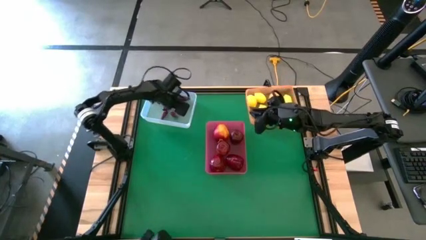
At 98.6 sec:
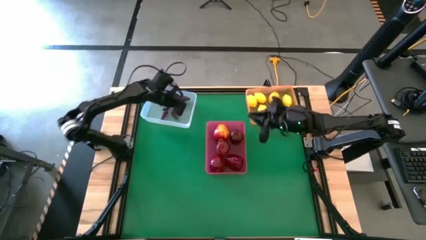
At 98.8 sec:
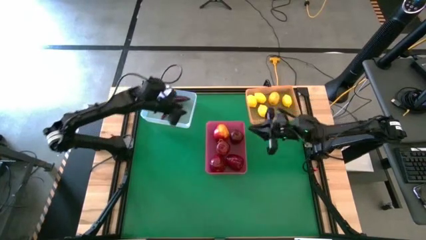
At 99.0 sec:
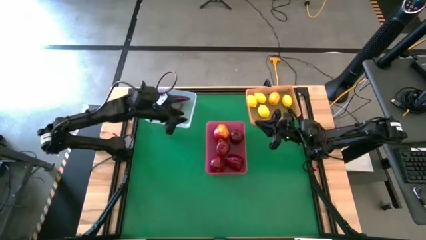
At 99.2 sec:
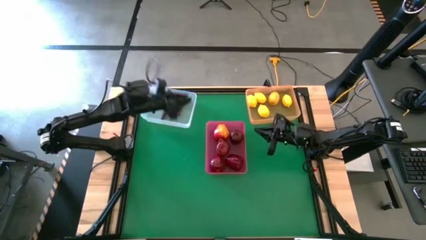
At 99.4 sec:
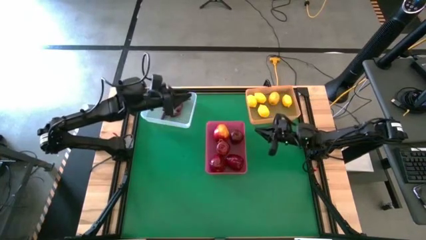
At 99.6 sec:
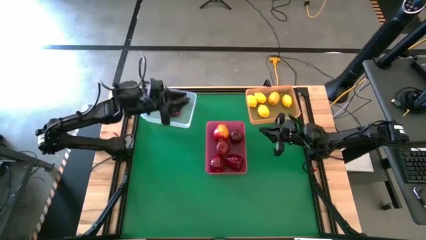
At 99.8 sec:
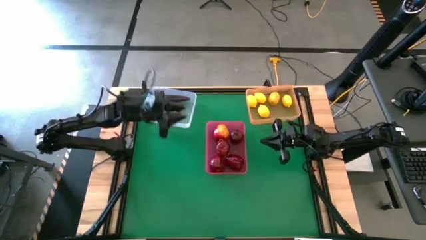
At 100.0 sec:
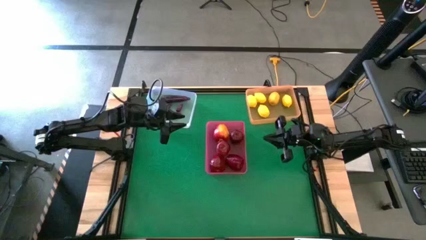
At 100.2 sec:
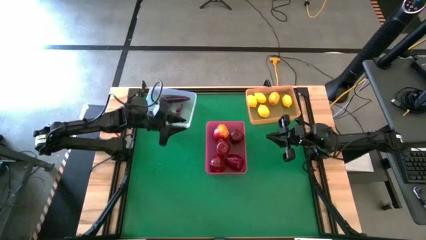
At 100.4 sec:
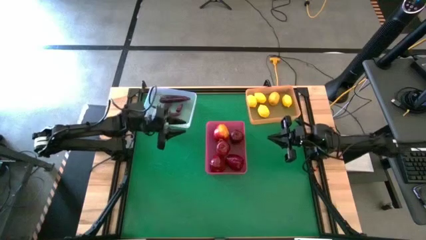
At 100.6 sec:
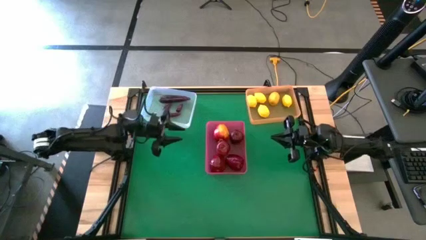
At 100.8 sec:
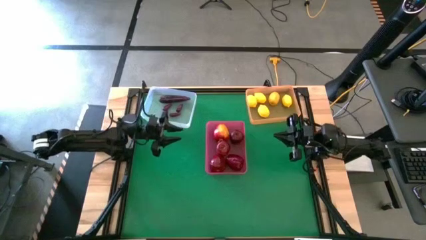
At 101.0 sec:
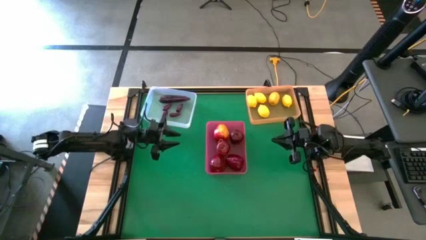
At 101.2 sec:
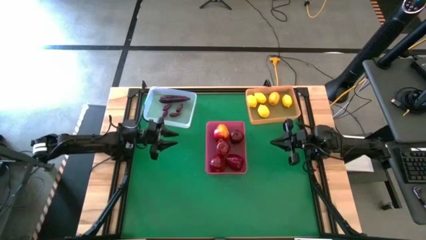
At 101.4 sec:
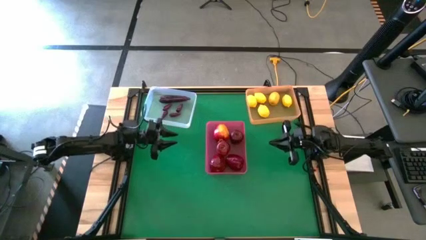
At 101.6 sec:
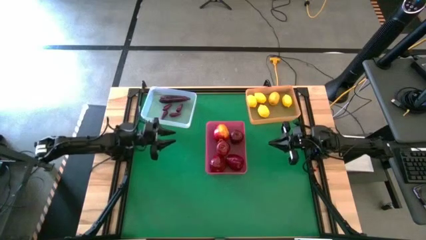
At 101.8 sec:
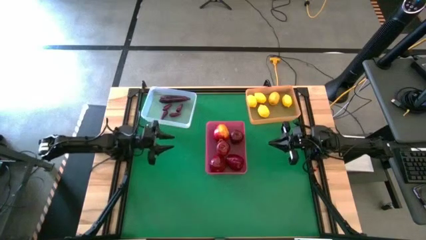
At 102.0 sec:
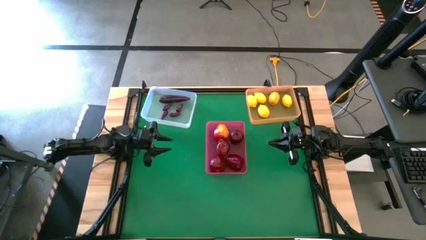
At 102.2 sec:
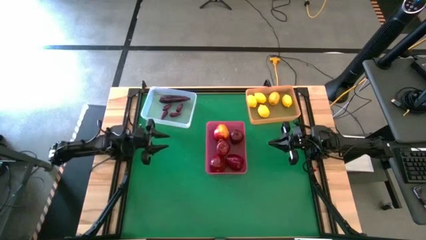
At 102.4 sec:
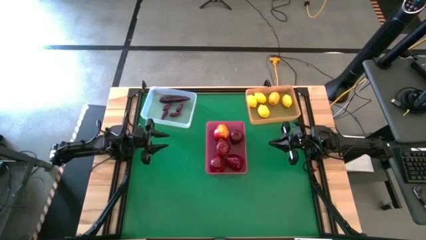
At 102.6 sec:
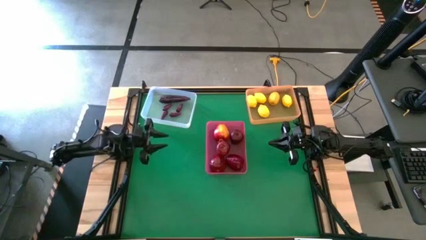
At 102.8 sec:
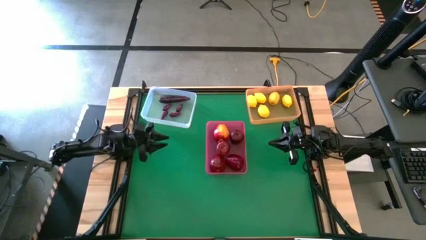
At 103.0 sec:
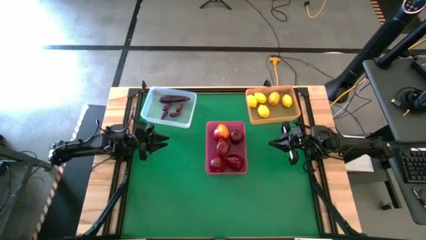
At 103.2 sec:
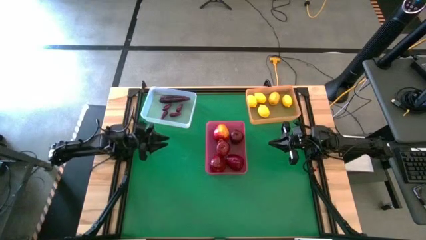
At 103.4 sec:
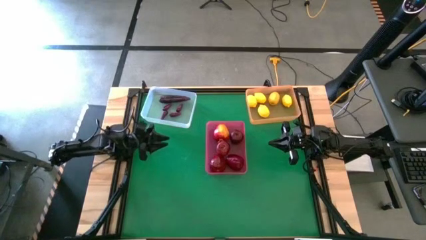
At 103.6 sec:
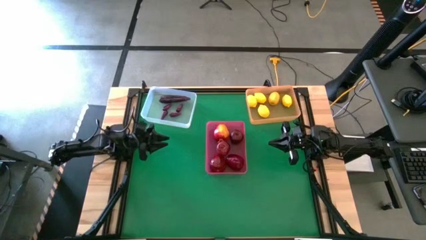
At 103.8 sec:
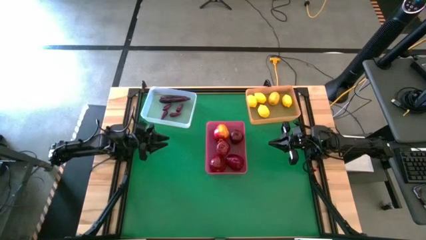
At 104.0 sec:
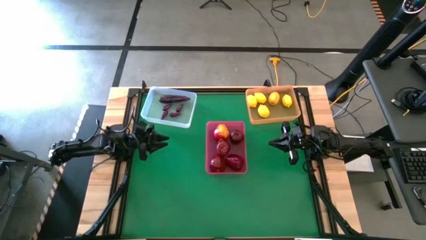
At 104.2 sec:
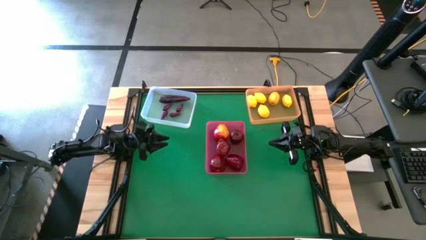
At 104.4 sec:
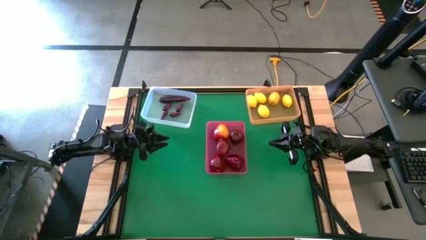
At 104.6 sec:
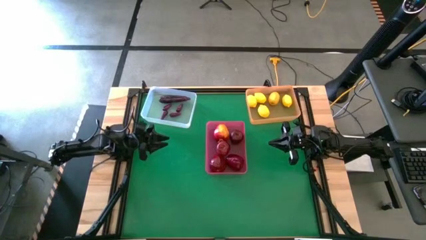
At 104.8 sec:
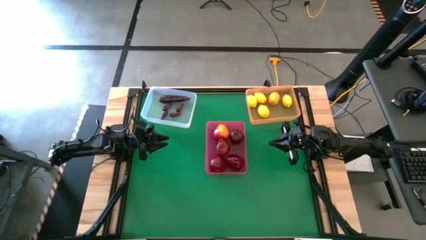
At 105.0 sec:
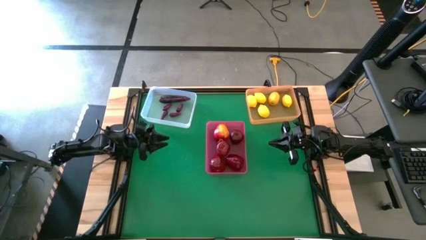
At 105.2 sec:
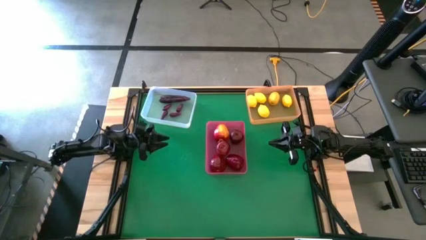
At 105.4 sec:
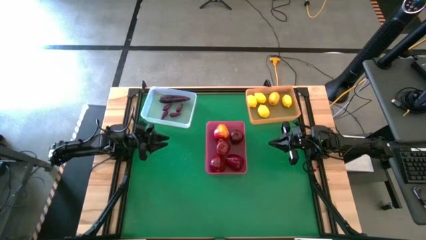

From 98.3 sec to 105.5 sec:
Task: Sort produce into baskets
Return to Home Position

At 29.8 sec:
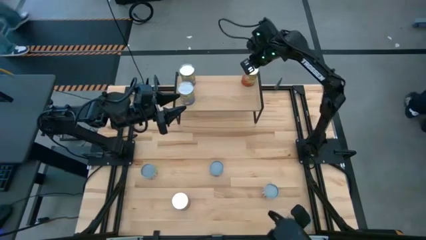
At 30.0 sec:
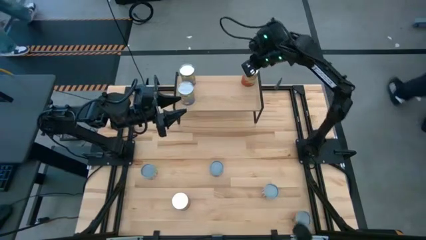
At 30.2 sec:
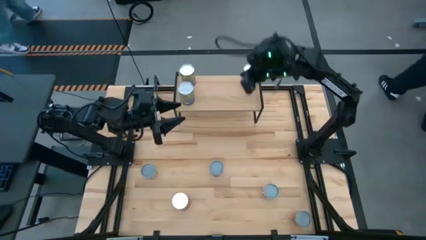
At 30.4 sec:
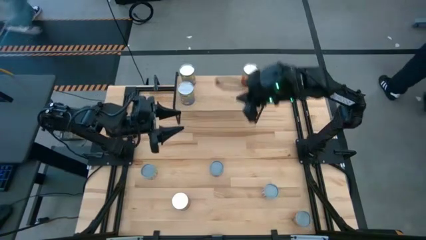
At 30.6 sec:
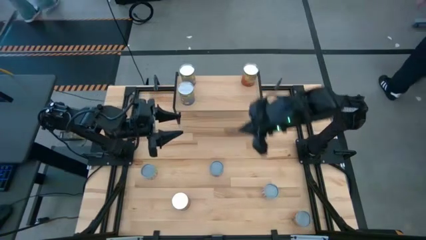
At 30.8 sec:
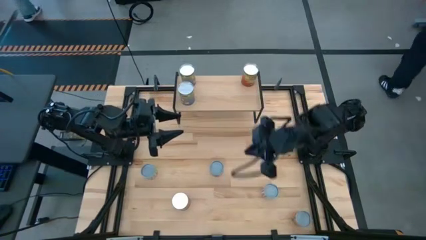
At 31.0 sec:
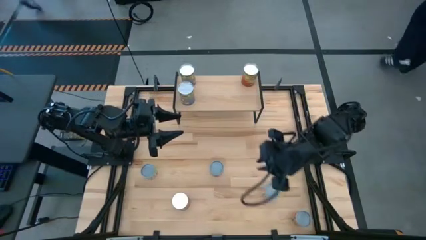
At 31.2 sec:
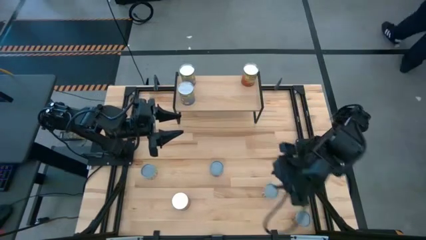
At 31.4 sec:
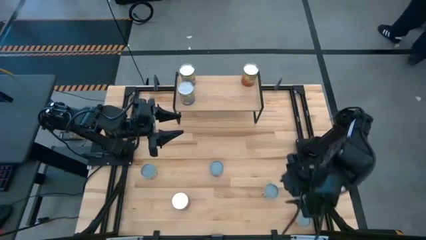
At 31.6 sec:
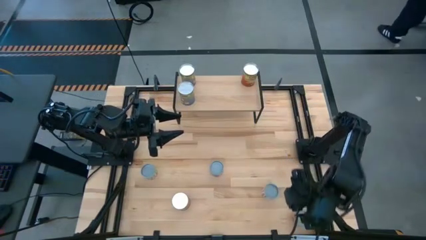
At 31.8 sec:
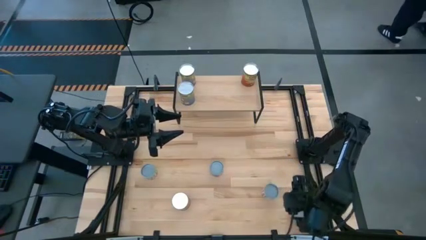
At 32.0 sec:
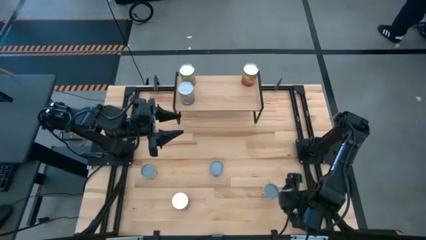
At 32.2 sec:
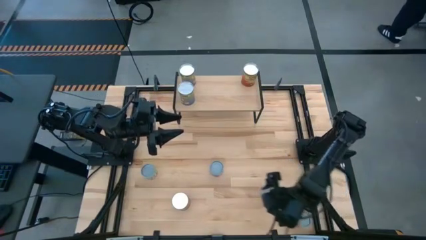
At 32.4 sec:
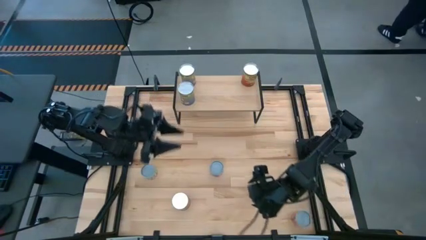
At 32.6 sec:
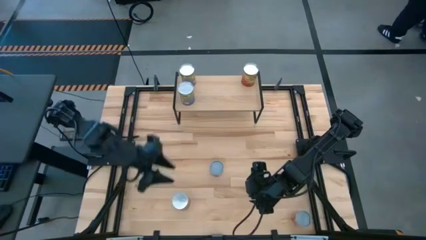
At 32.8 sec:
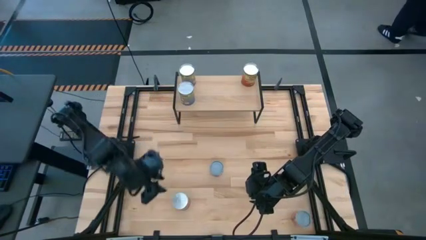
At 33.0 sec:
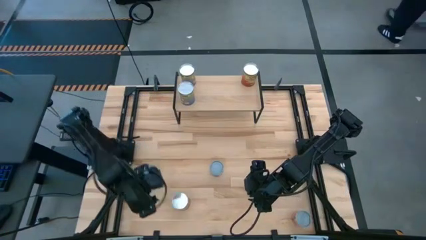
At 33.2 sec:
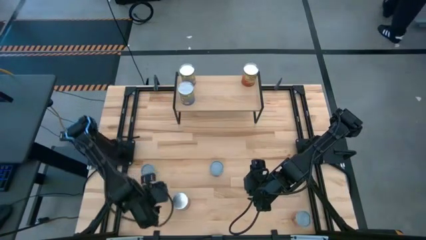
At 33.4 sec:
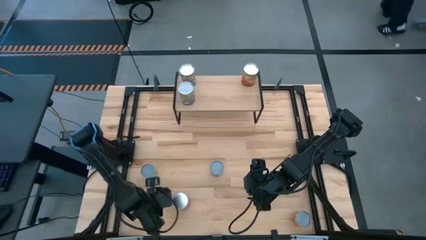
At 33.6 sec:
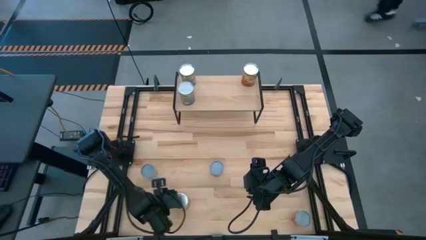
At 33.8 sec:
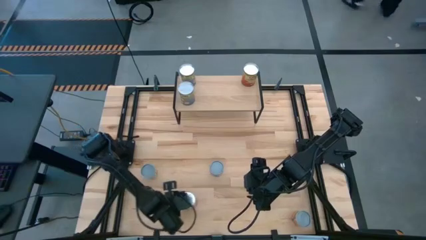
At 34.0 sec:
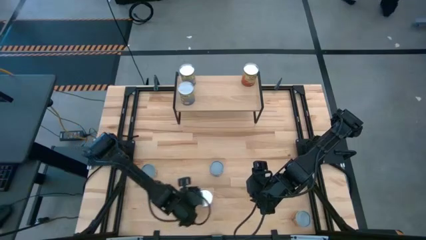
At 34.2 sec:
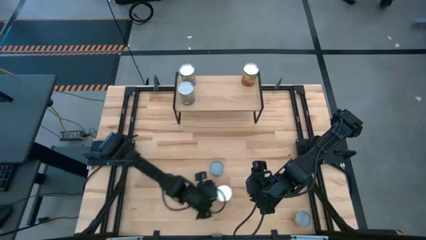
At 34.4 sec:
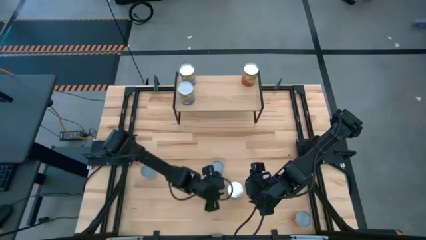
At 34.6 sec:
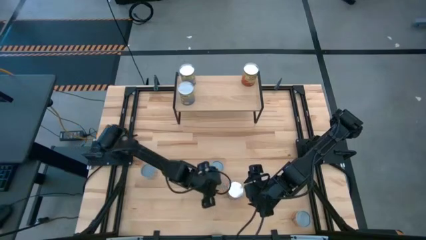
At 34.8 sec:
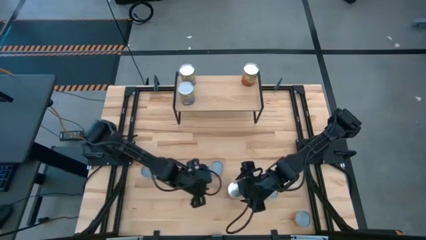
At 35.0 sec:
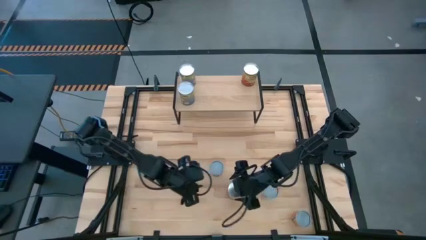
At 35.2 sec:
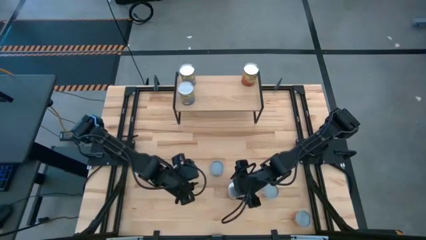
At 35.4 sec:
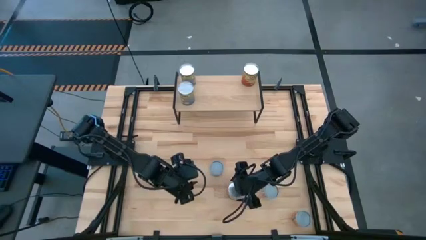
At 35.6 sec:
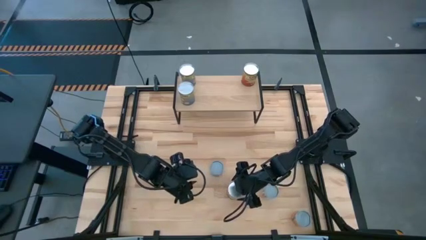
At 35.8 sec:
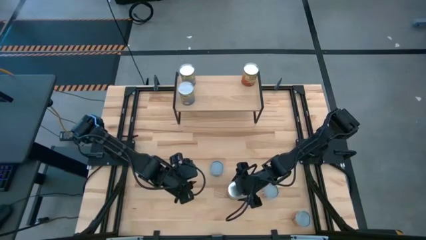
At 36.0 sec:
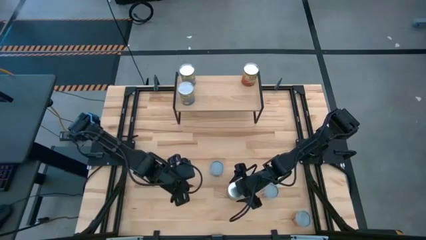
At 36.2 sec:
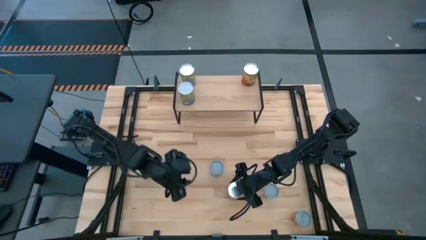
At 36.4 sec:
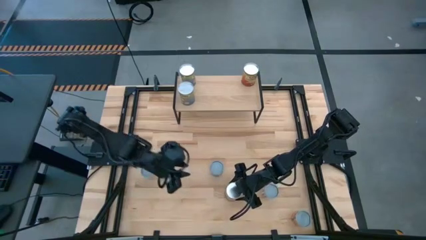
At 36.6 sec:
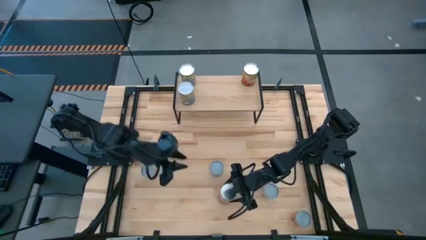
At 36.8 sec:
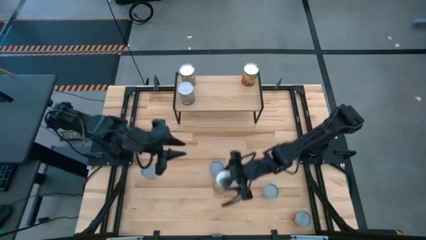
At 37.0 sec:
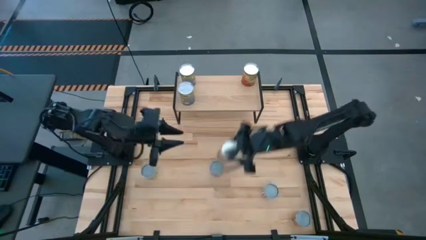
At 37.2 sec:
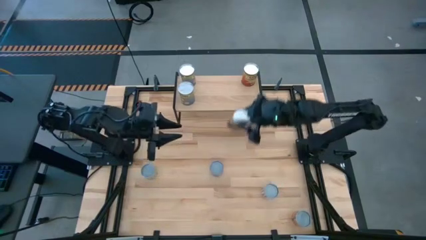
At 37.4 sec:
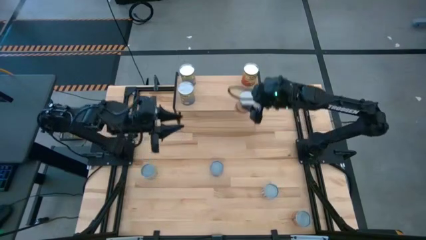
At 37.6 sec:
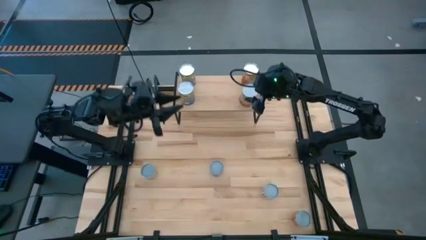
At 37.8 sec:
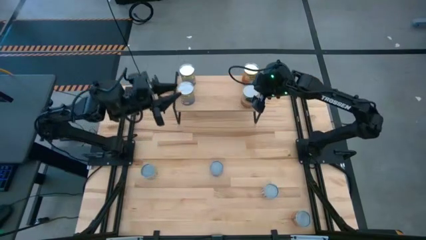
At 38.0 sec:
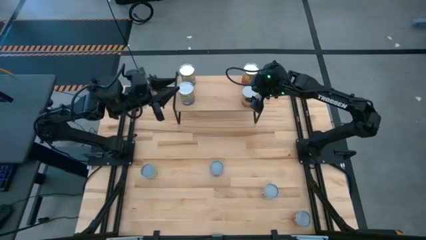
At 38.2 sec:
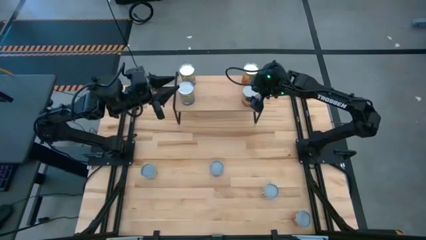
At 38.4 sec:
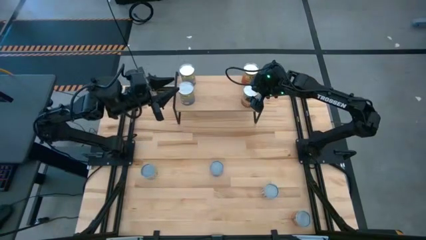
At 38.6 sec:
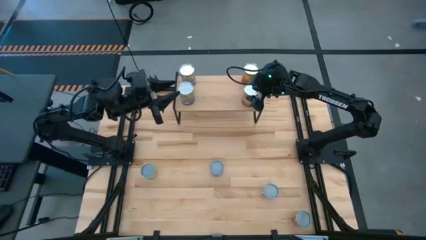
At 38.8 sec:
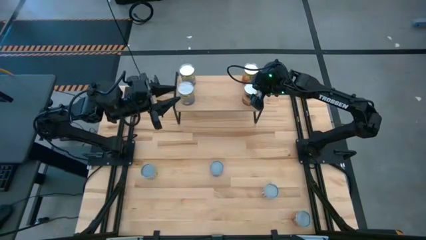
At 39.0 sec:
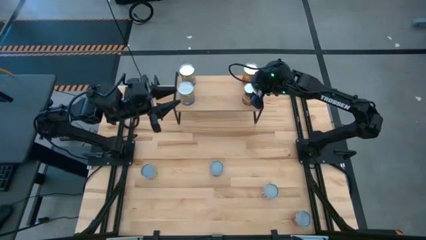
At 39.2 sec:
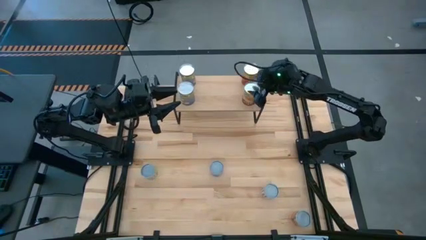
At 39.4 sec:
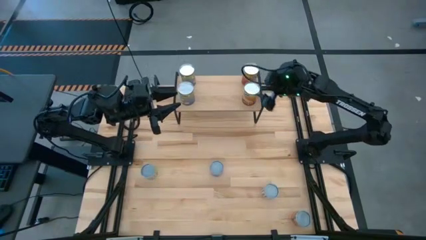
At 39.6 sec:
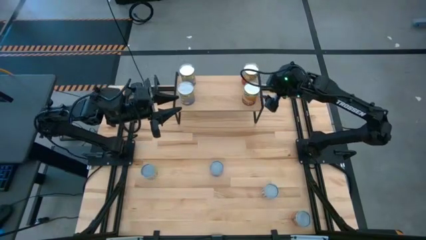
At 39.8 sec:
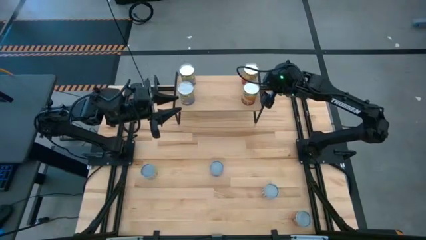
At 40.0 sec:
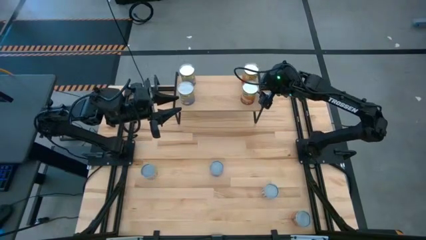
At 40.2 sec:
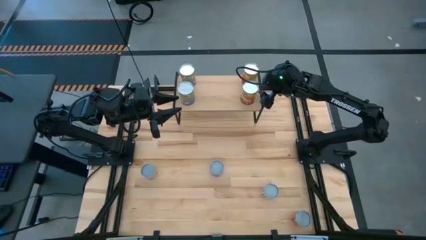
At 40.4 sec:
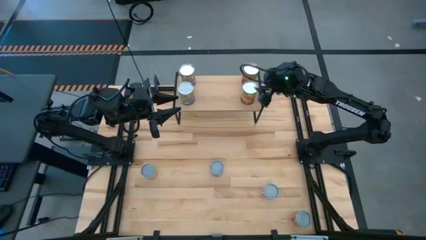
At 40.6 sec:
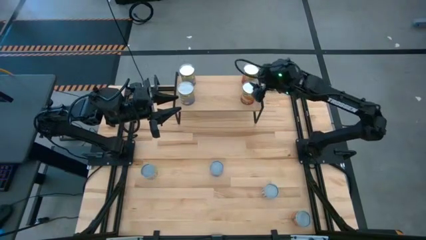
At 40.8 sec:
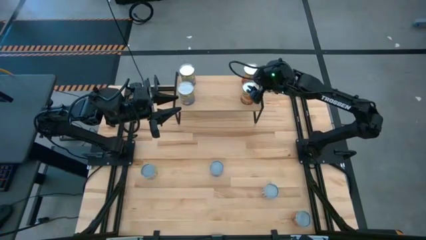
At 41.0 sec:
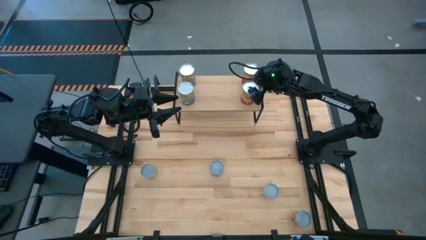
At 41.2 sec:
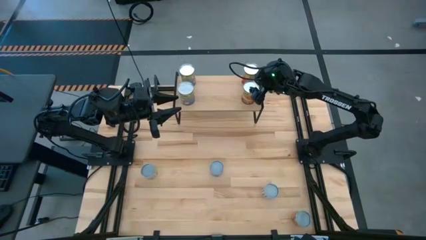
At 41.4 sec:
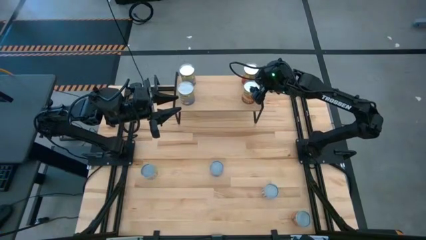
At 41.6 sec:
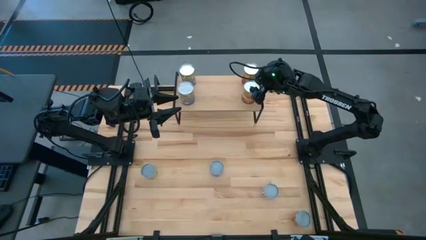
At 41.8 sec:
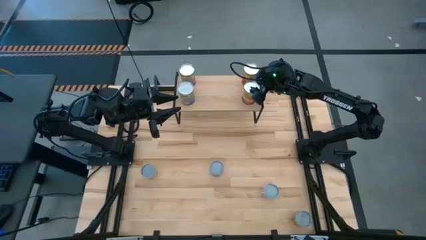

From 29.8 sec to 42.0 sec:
Task: Pick and place cans onto a shelf
Put the canned corn on the shelf
